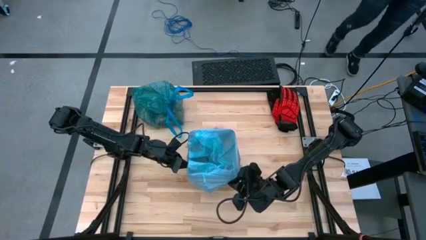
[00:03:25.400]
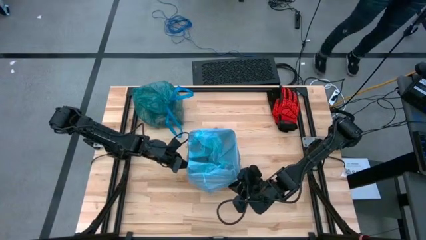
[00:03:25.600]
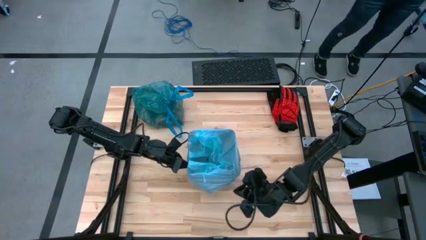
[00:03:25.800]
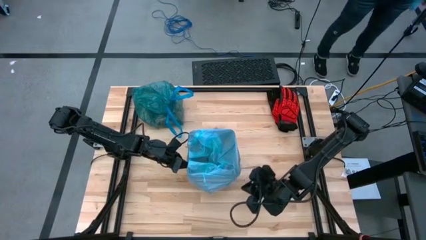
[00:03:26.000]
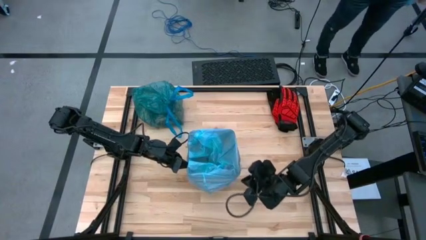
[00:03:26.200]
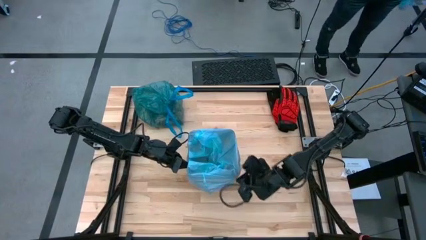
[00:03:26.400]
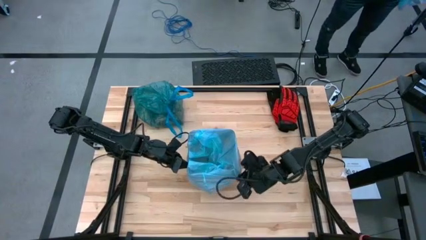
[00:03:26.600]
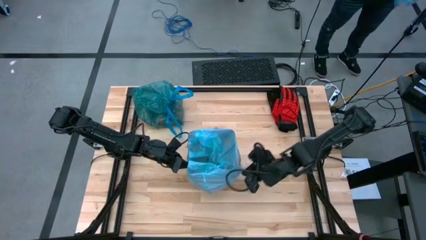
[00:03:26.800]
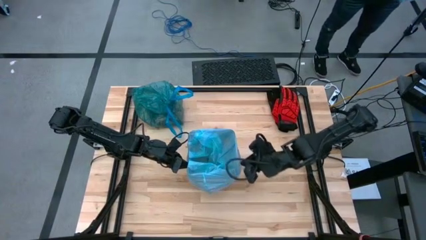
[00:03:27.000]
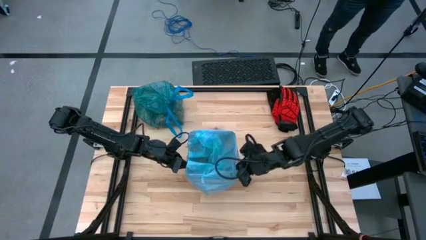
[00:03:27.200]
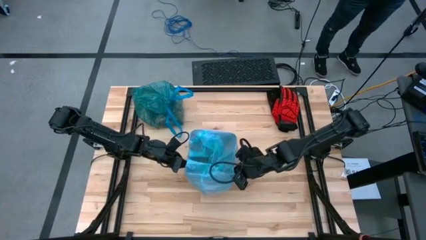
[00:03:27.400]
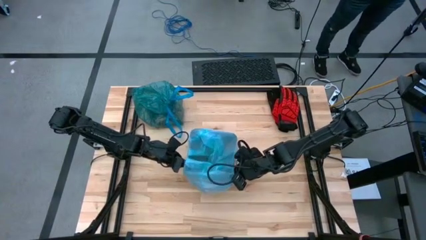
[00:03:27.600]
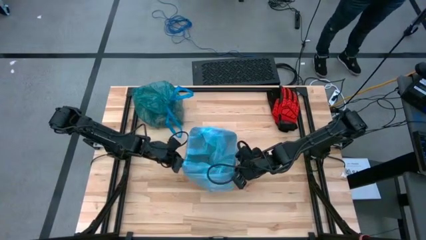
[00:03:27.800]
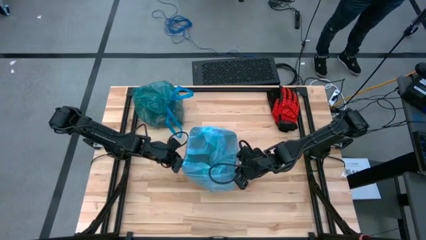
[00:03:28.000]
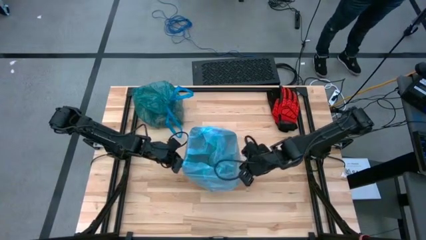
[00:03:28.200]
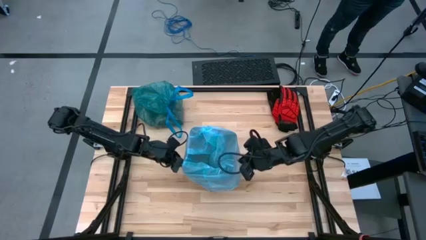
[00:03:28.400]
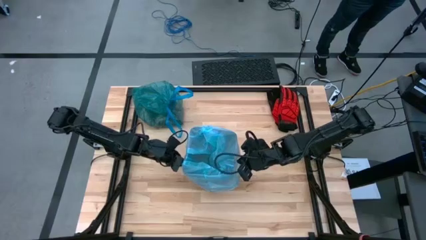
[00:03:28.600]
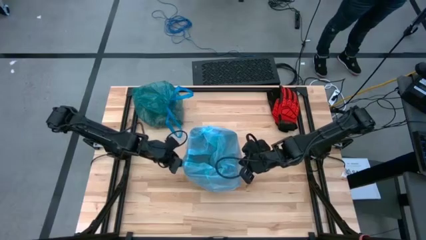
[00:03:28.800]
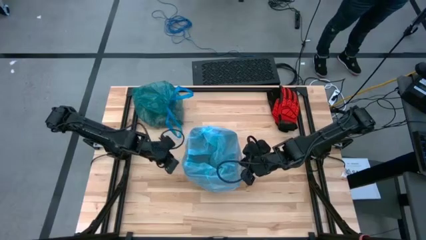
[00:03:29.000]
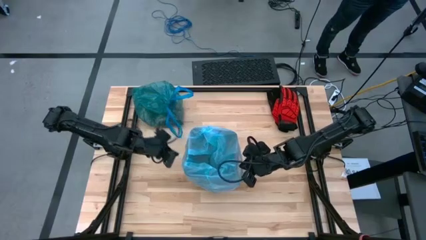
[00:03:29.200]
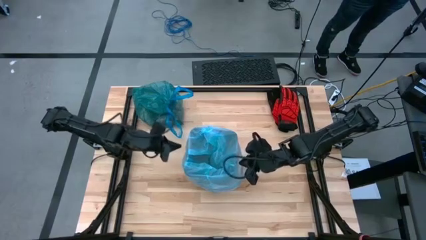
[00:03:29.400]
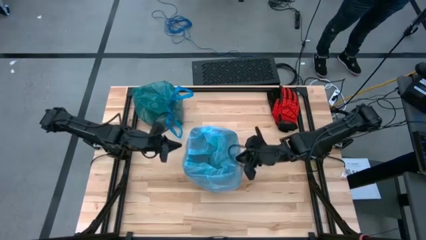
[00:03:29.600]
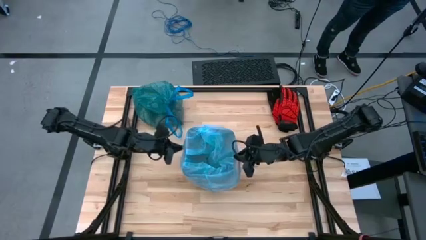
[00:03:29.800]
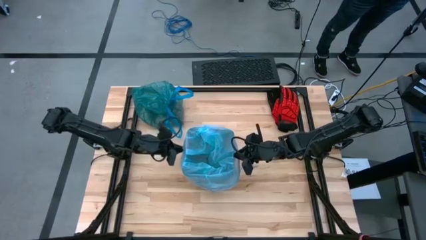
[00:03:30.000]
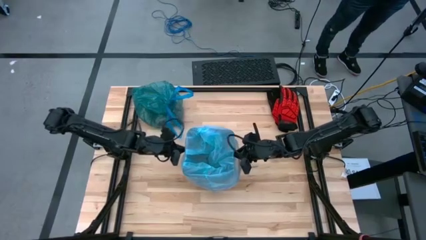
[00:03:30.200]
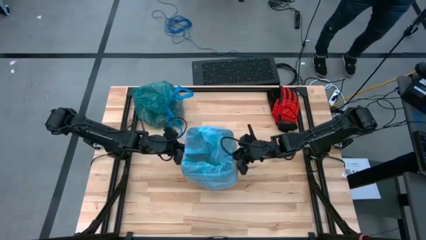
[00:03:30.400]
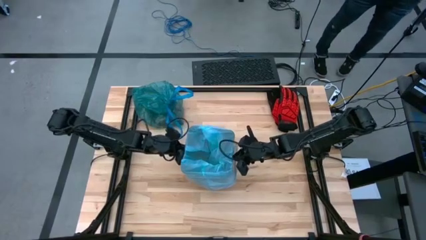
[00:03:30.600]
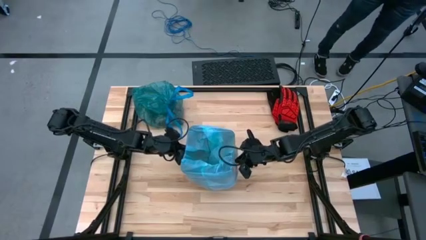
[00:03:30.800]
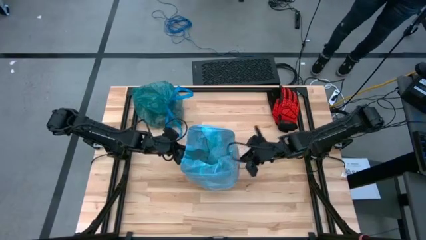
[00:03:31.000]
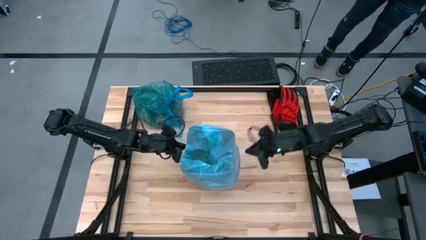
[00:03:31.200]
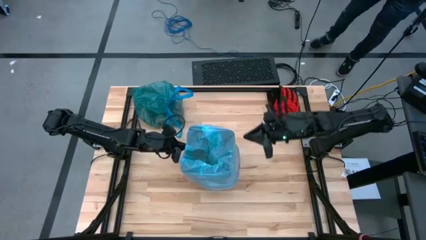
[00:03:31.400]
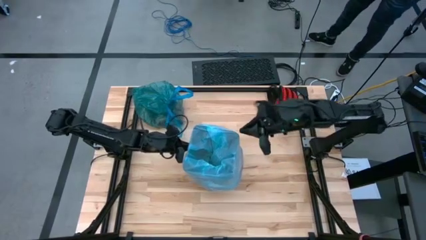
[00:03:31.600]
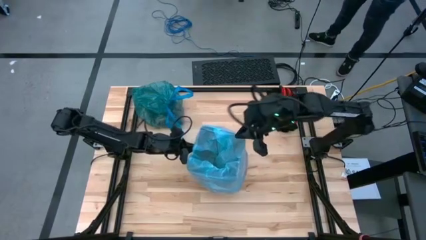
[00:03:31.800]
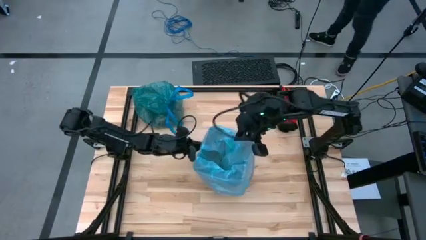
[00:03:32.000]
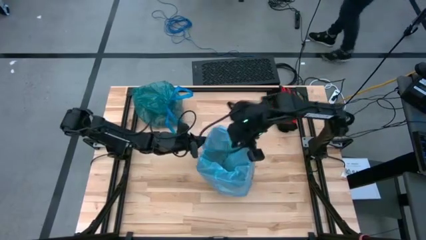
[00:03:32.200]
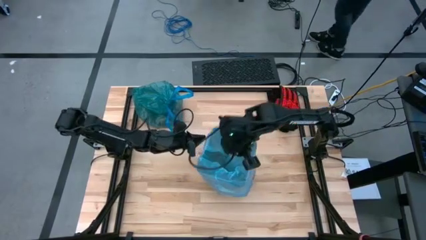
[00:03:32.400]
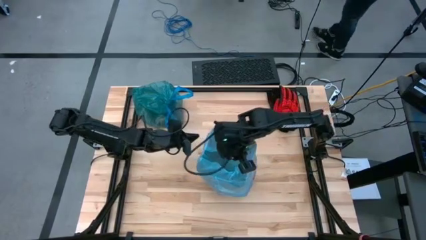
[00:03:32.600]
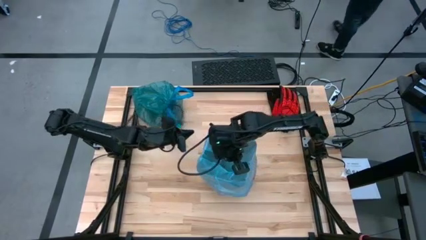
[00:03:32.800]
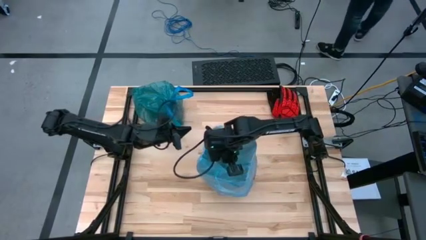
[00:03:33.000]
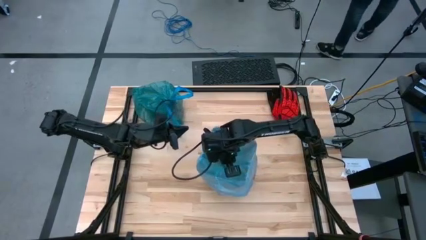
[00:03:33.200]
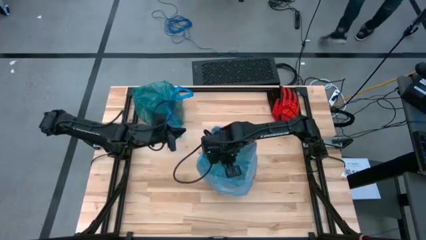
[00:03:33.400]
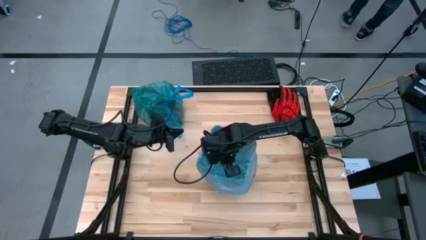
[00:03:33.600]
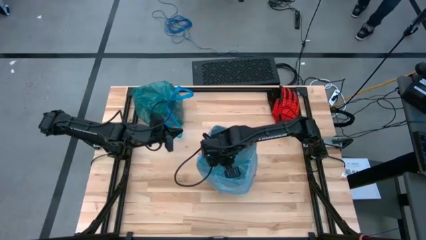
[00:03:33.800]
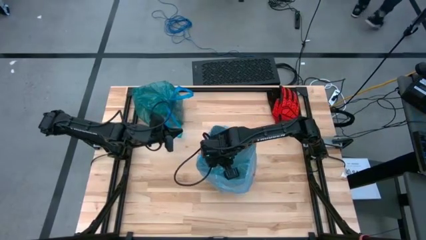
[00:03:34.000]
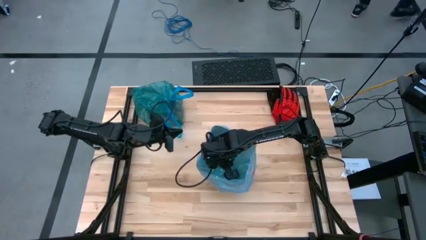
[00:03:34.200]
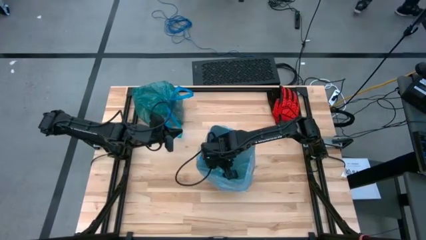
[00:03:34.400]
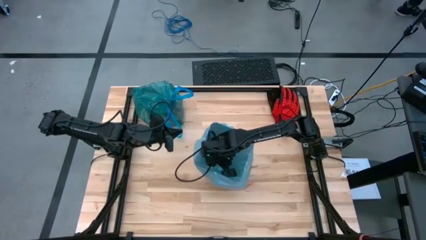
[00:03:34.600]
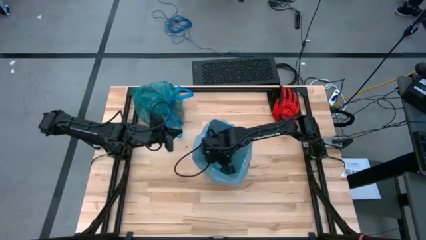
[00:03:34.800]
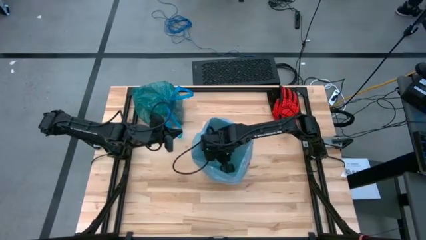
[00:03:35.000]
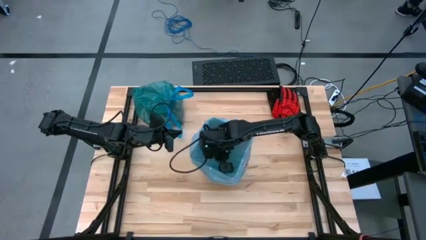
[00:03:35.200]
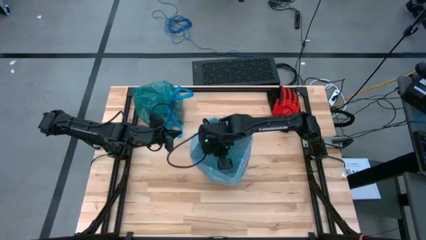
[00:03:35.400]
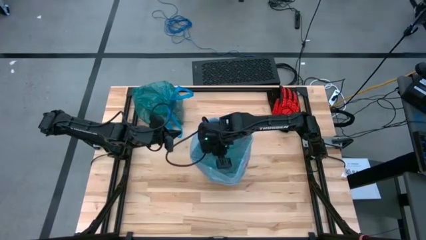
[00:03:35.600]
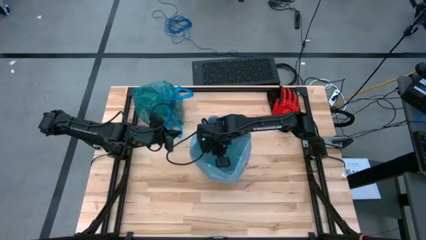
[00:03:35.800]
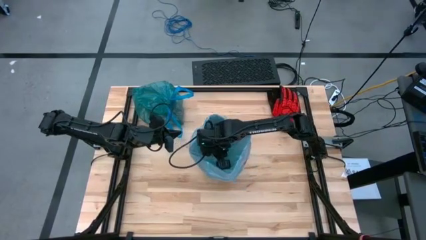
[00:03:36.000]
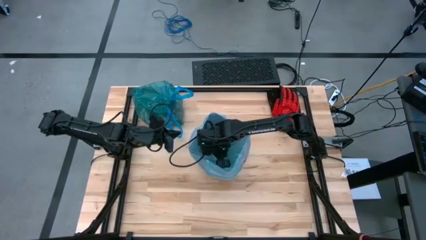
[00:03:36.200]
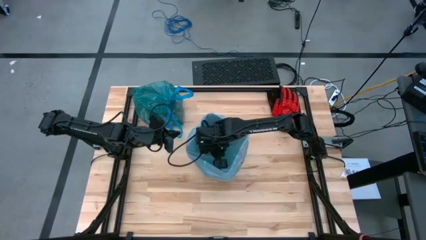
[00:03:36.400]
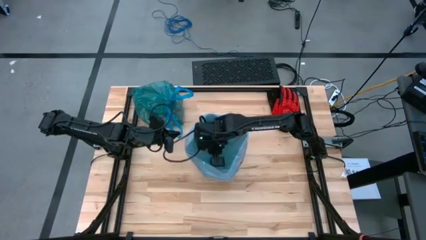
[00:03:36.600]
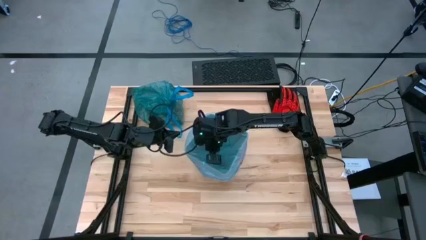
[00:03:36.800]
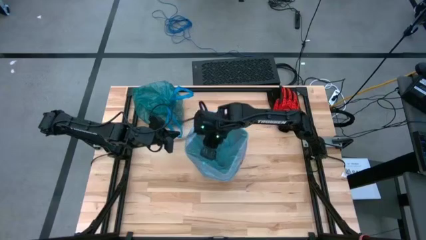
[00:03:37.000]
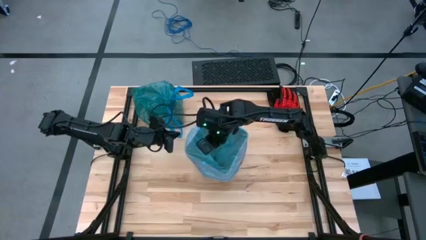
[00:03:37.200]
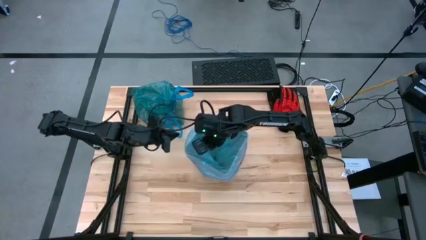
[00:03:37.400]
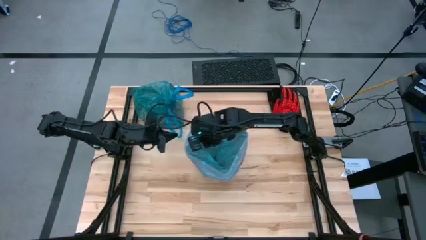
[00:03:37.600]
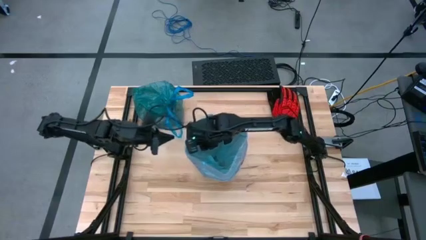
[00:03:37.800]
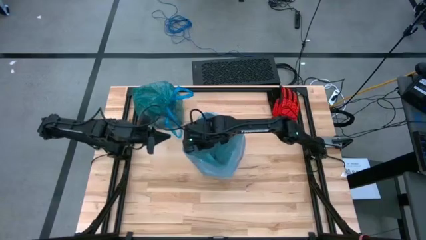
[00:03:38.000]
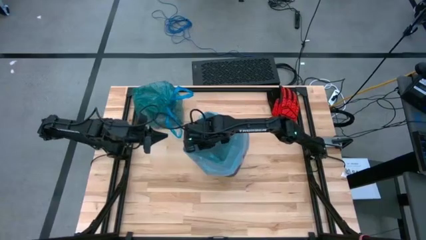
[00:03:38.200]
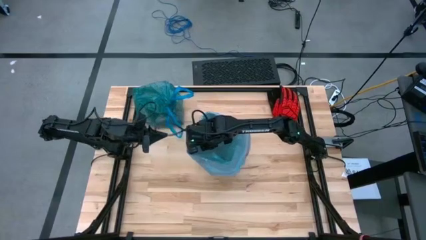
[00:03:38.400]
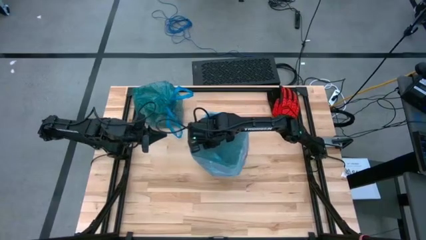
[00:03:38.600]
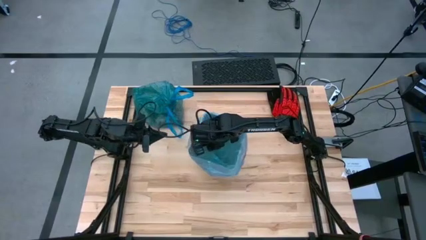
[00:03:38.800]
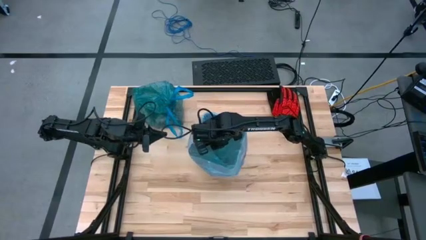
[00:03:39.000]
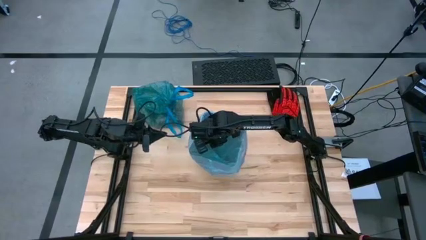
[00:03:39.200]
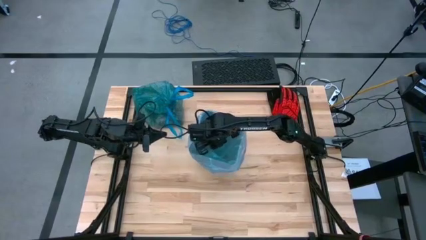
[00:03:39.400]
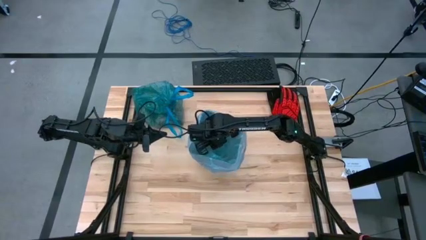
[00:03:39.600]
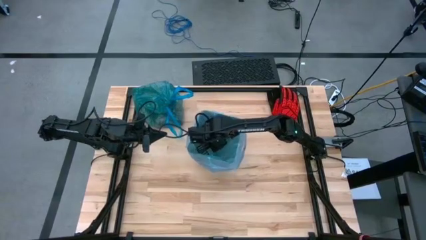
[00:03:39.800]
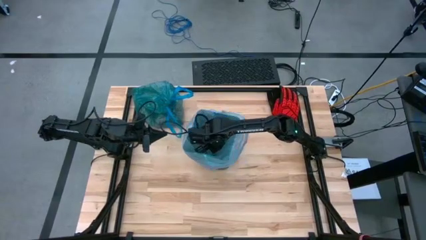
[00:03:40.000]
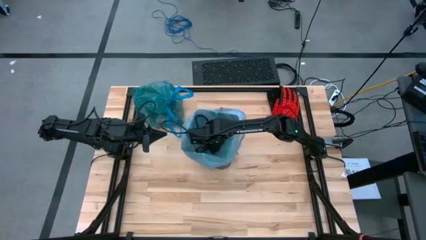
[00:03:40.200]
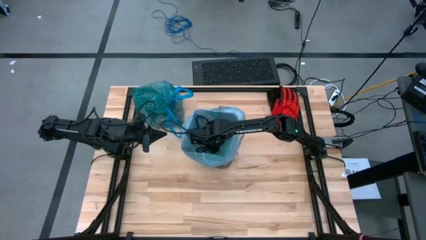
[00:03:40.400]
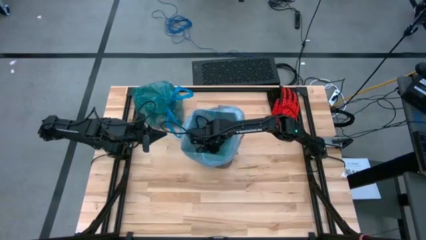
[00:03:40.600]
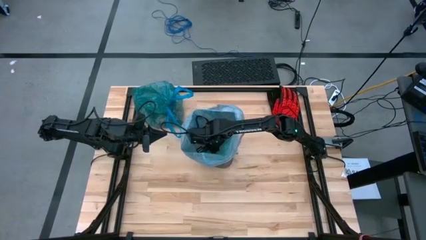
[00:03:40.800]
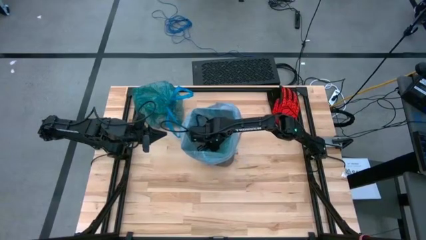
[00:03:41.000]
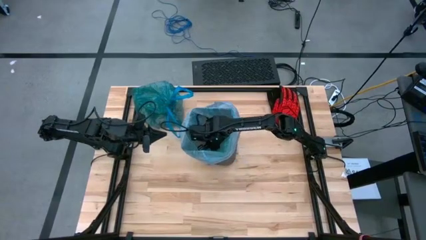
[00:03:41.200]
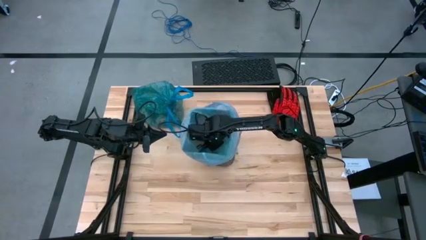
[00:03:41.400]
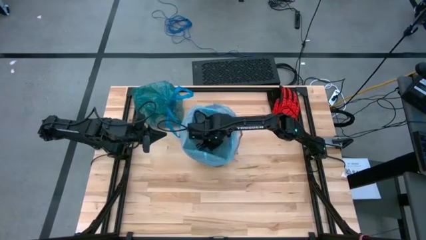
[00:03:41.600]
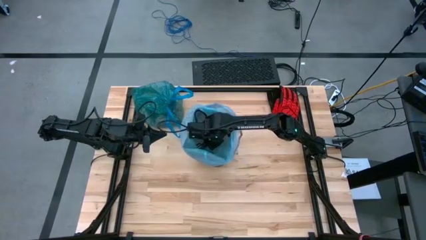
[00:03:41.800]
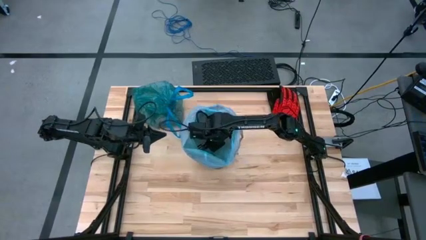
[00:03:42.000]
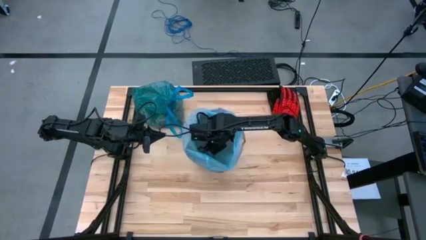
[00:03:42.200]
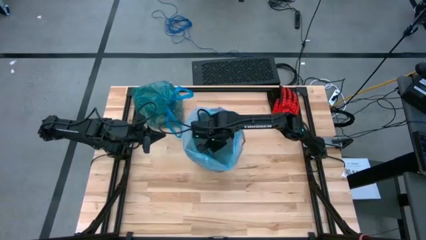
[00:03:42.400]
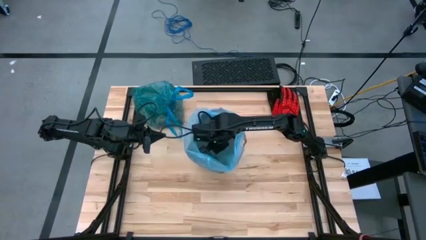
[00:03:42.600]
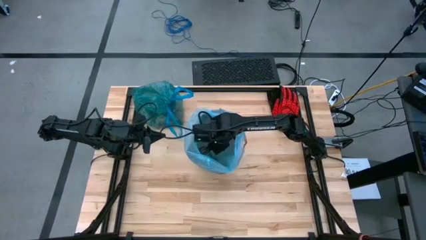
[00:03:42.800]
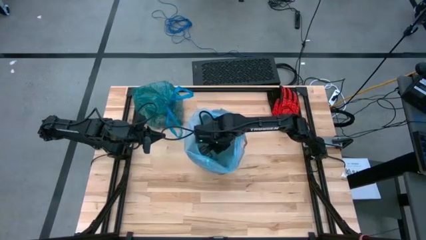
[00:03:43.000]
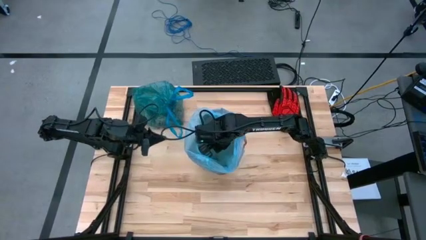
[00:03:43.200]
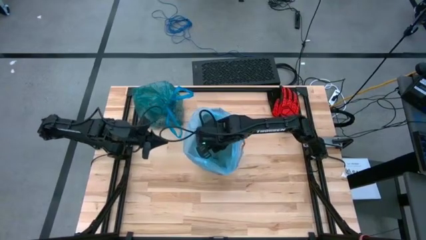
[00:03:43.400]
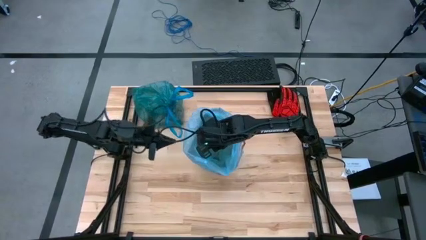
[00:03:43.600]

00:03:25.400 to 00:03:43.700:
Task: place trash/remove bag and relplace
Insert the new blue trash bag into the trash bin
